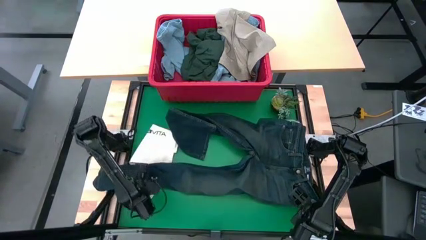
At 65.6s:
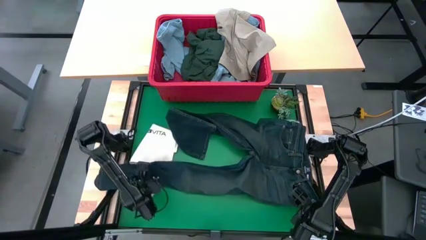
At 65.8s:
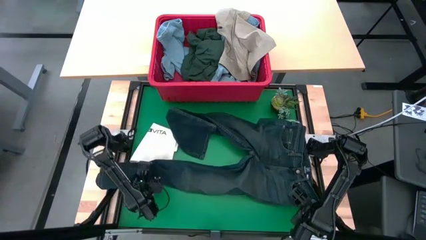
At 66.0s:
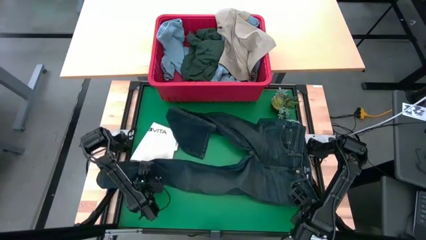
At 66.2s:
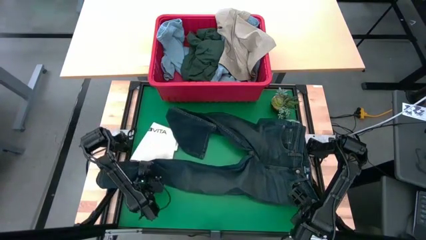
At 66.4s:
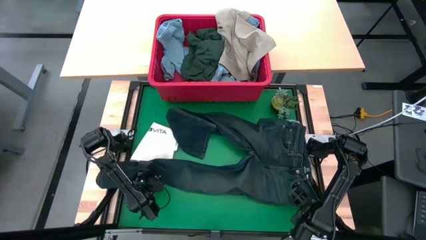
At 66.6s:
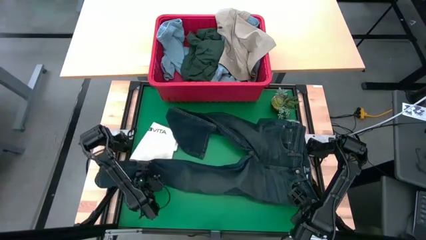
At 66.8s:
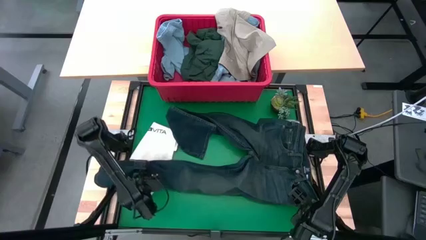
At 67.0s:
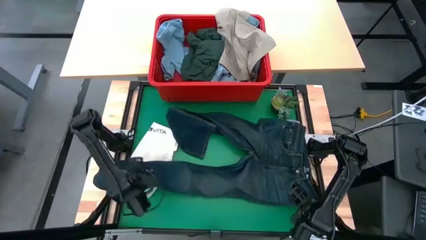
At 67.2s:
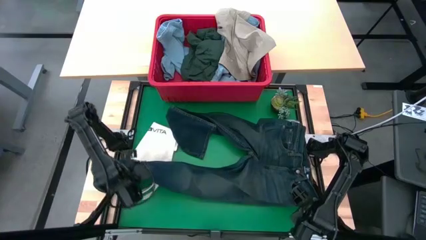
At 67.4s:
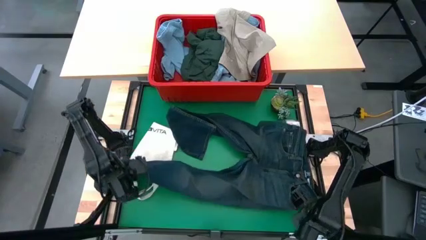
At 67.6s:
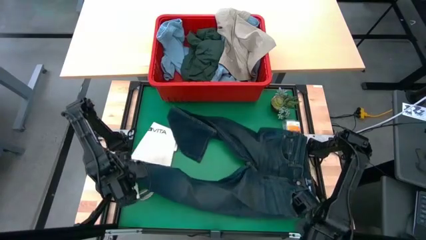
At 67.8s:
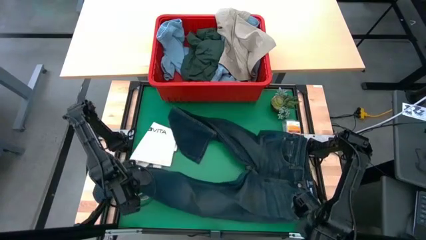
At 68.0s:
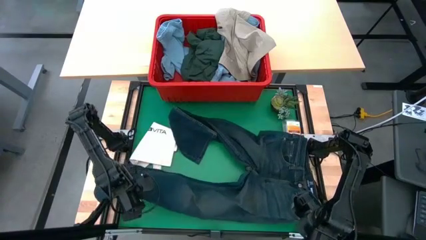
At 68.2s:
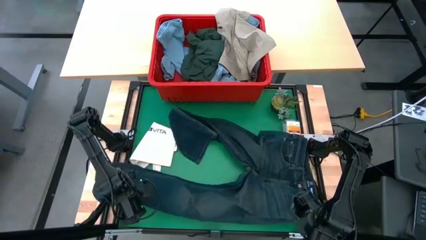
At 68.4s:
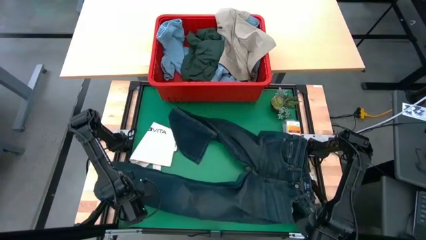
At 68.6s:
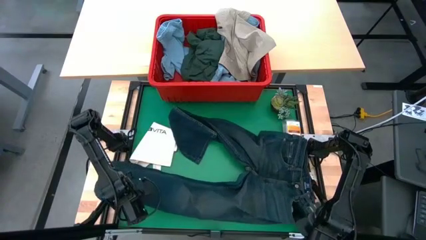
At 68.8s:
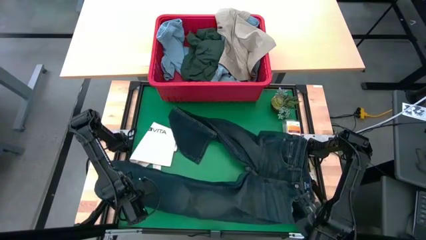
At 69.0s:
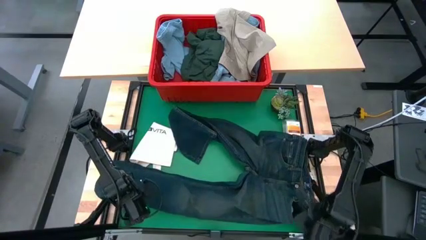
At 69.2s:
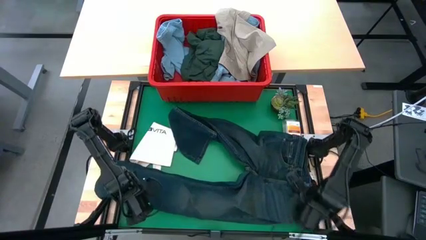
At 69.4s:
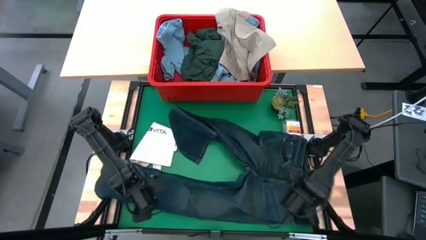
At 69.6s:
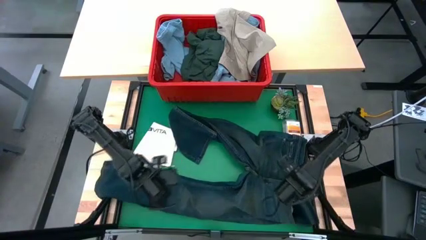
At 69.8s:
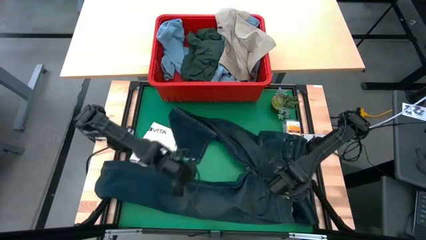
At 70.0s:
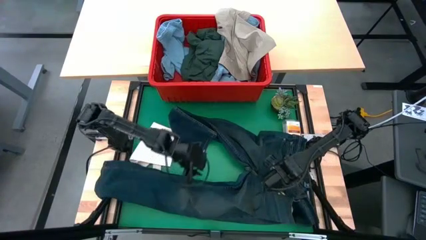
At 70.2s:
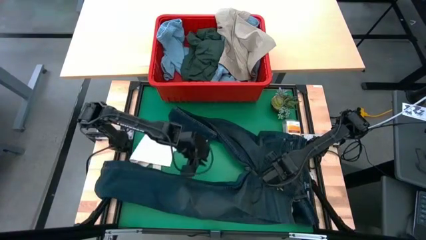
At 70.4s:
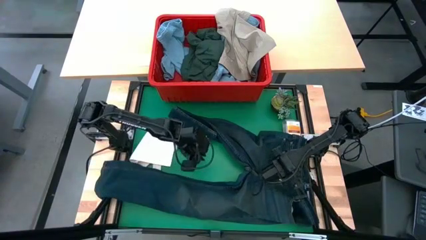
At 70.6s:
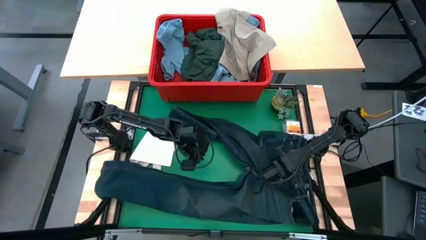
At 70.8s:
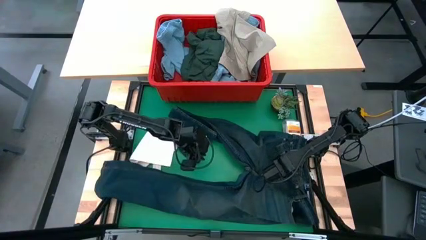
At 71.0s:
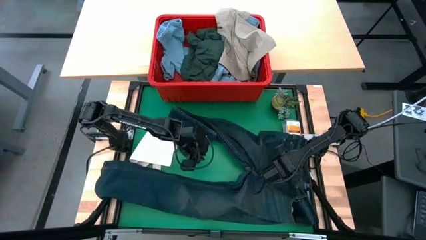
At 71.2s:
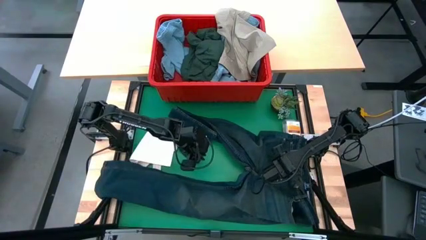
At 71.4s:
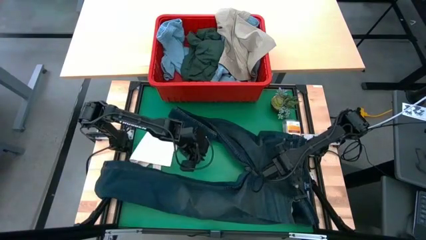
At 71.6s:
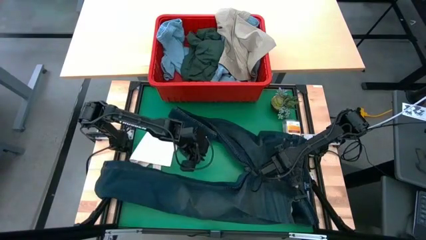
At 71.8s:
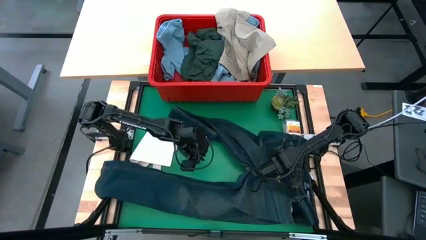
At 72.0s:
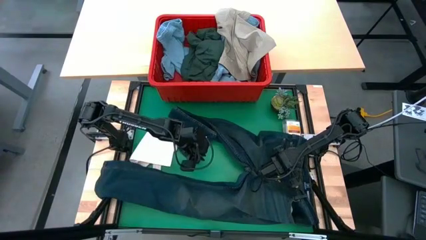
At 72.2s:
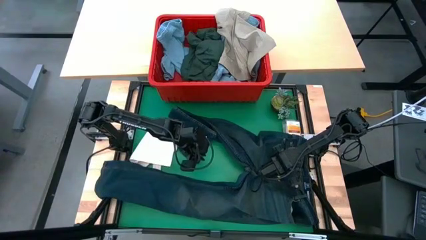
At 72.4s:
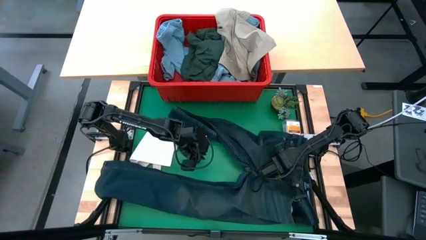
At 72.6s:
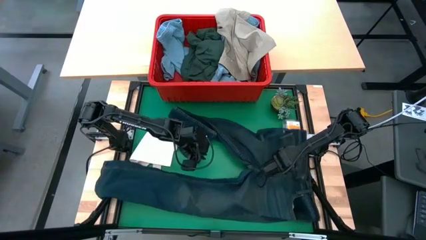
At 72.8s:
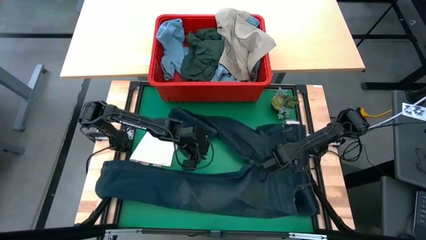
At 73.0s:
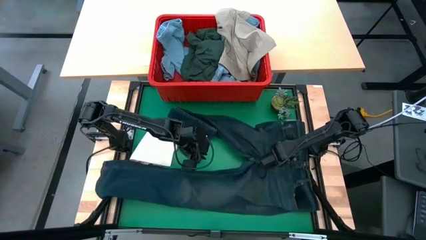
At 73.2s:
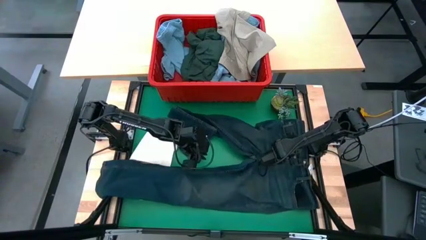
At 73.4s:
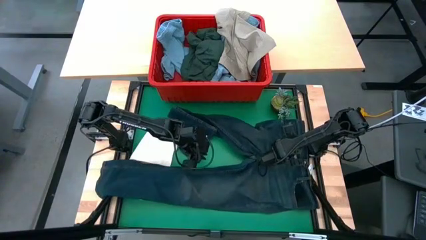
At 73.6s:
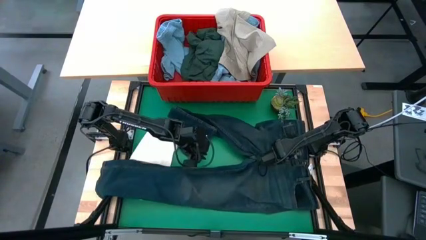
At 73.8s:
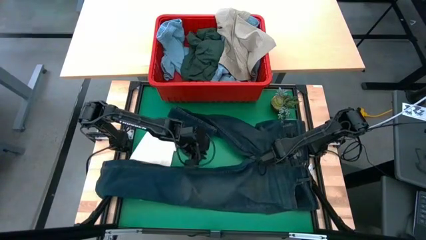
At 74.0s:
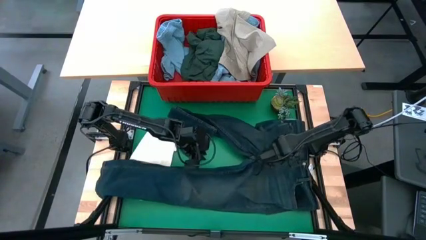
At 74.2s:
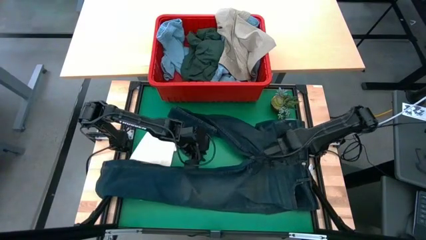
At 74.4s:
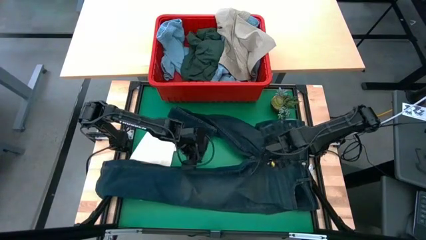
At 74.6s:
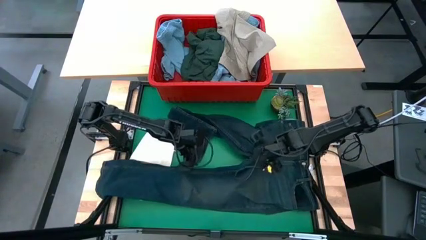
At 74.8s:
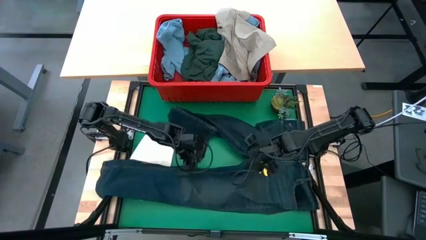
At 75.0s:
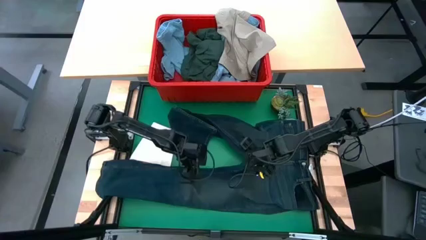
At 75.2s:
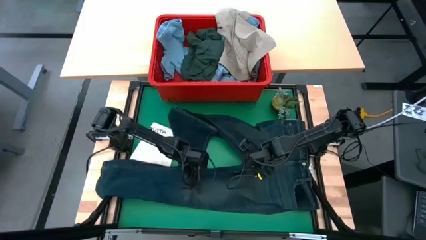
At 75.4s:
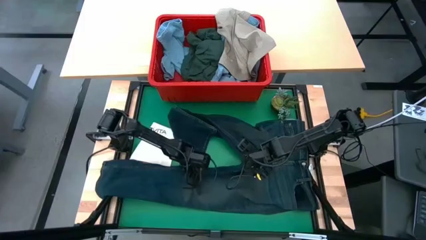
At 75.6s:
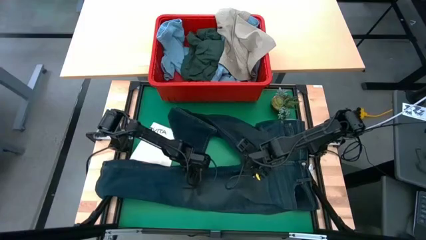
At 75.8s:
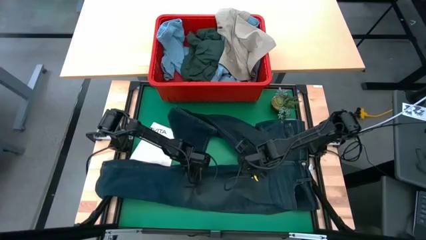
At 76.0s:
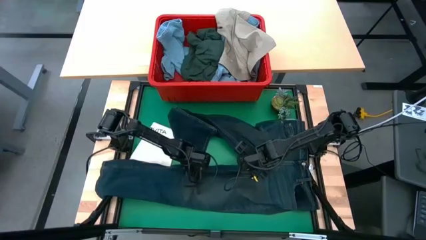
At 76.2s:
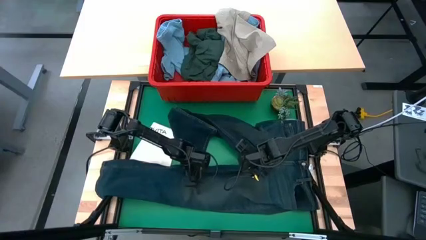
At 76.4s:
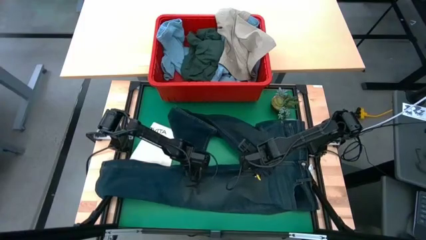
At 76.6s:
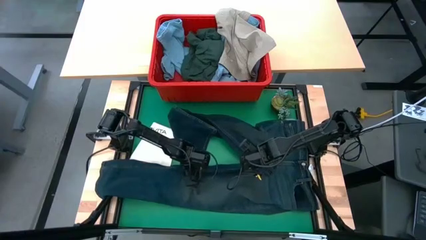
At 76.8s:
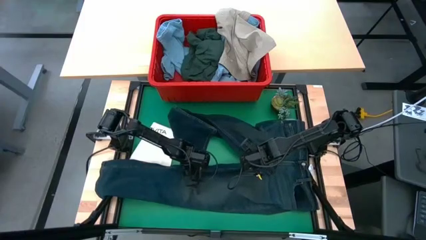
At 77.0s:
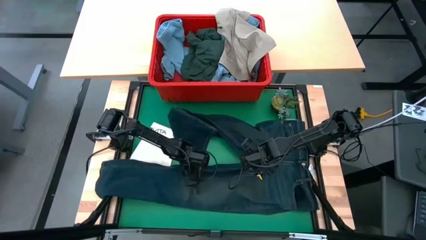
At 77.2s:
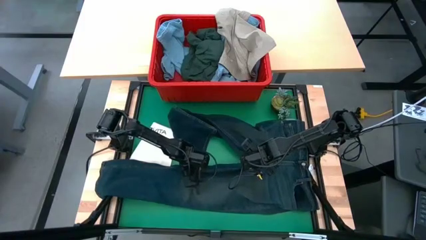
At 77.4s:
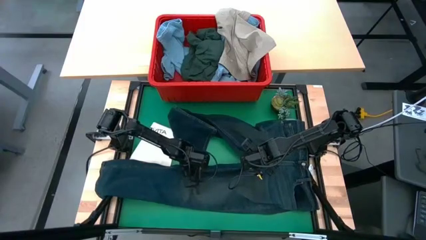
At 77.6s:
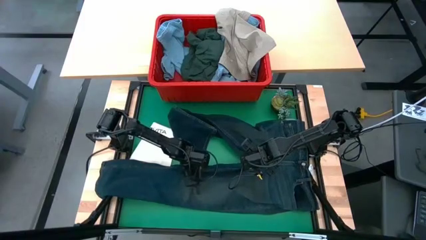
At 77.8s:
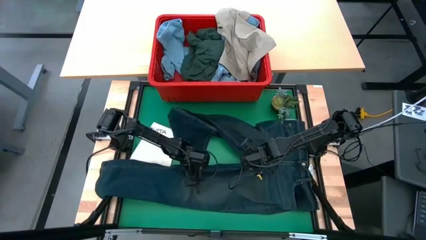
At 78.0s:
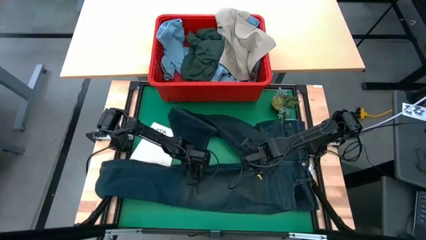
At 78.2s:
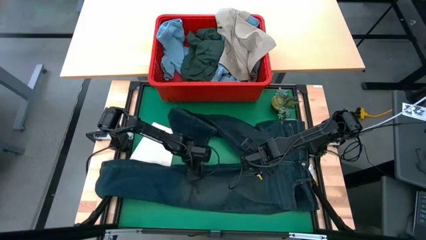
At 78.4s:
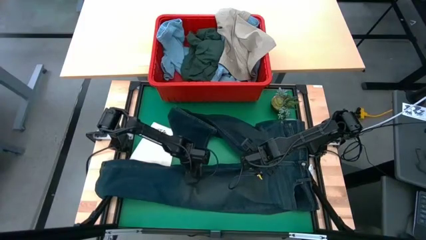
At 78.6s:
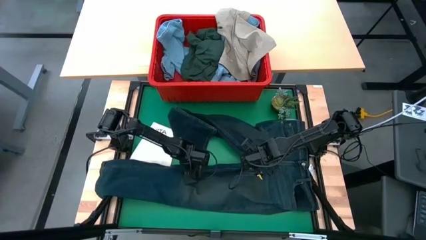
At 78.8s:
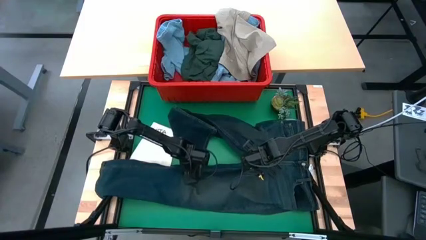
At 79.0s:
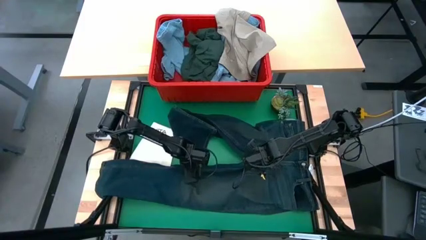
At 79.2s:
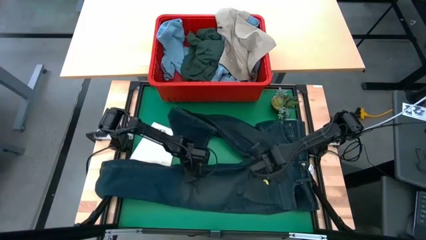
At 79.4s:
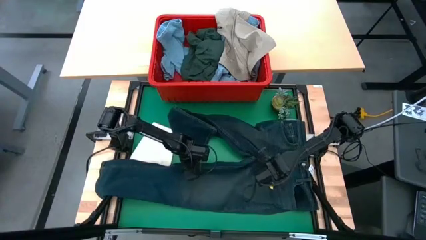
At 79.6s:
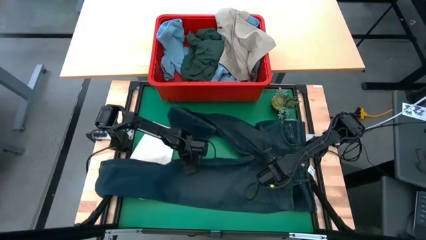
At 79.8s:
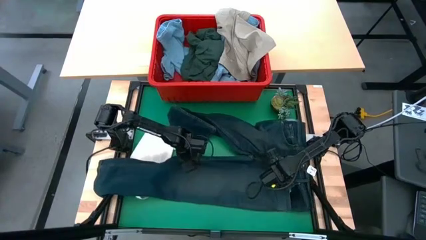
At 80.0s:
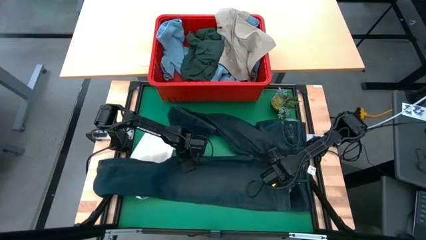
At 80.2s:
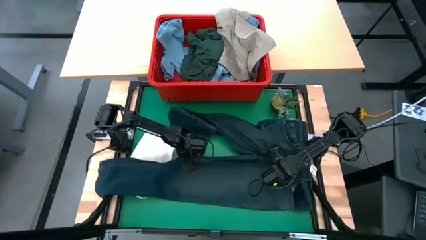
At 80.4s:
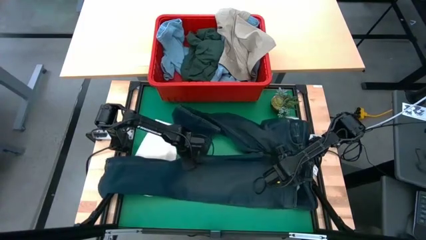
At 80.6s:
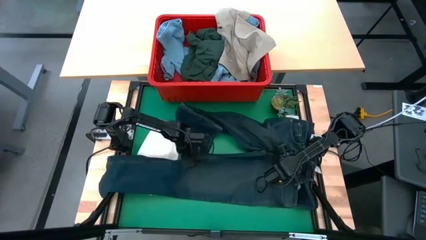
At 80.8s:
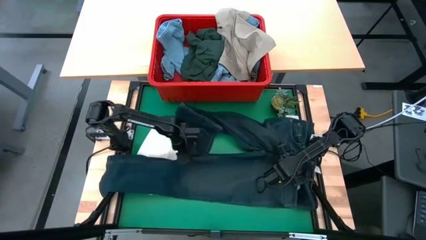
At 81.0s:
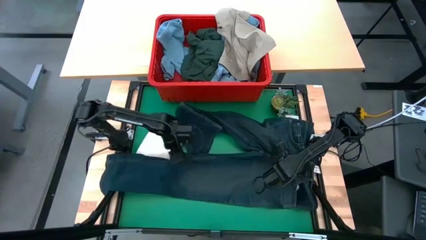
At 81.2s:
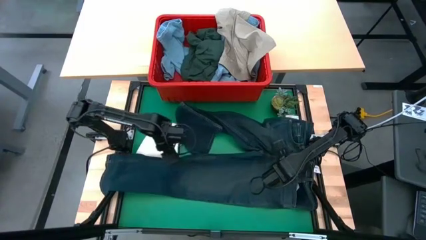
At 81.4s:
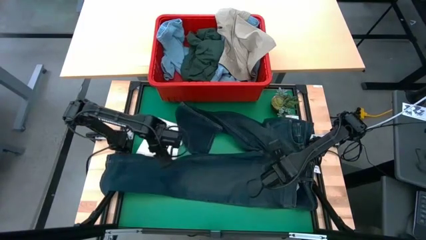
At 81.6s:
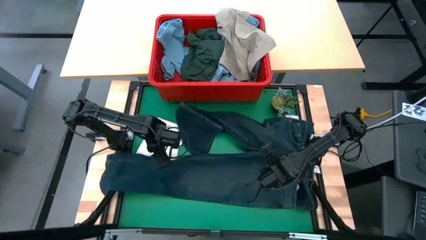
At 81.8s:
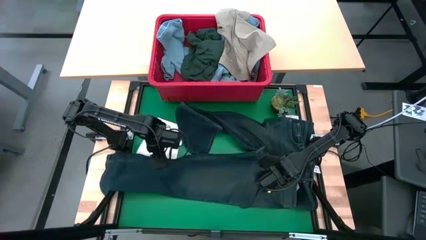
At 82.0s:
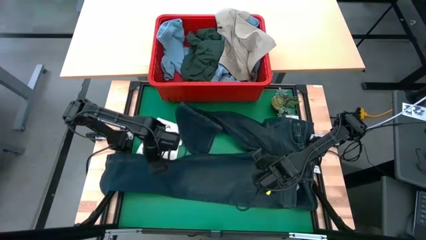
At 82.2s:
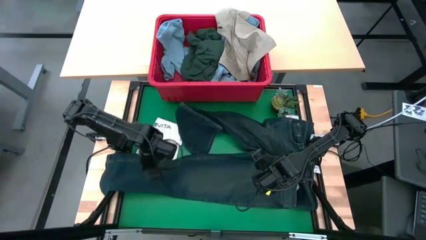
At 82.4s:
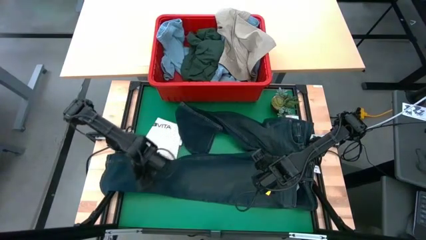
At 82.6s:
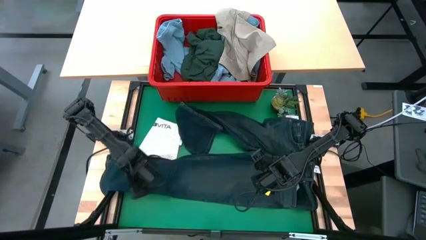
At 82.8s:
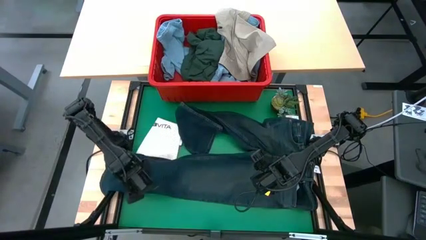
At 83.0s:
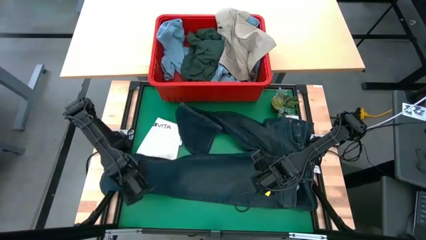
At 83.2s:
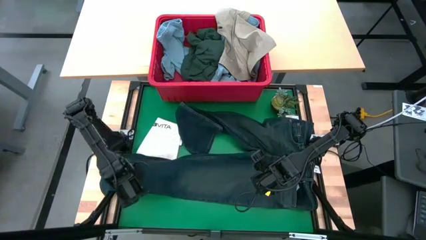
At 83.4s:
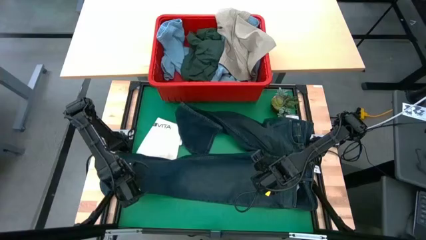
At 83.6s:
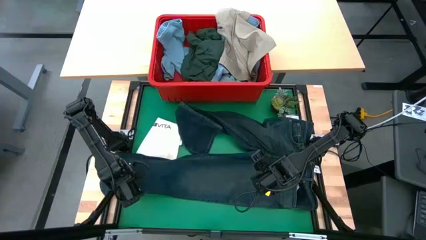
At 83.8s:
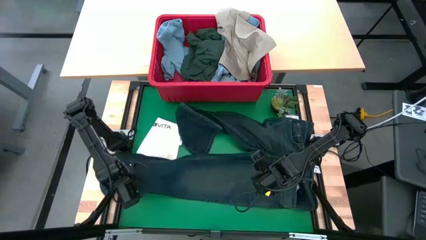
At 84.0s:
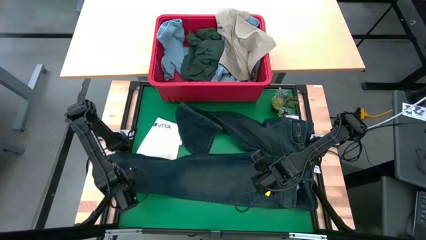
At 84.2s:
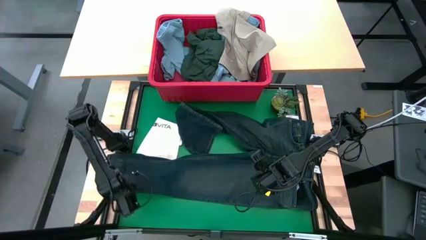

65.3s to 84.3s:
Task: Fold laundry
Fold the dark blue pants
